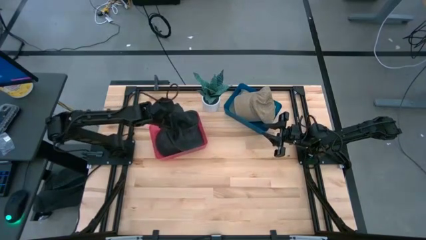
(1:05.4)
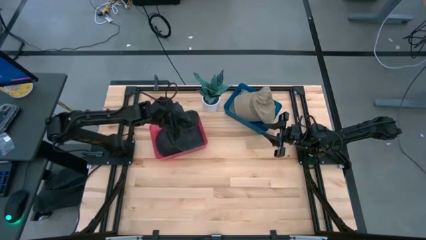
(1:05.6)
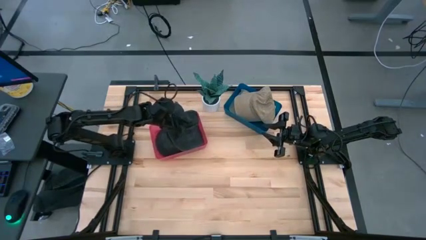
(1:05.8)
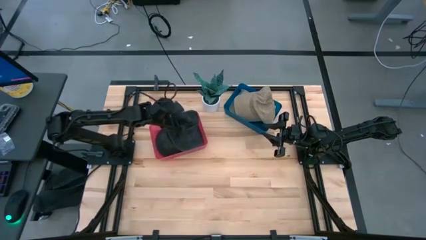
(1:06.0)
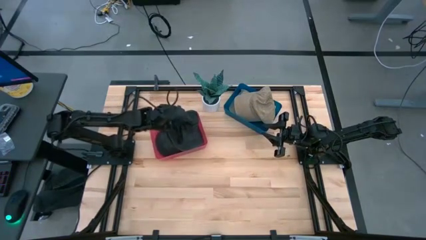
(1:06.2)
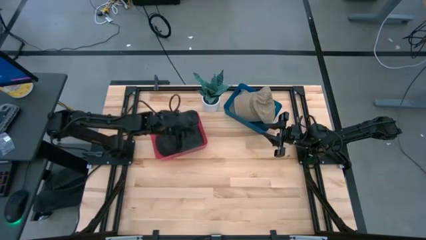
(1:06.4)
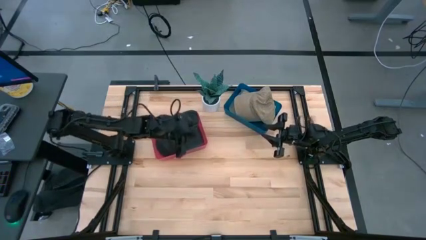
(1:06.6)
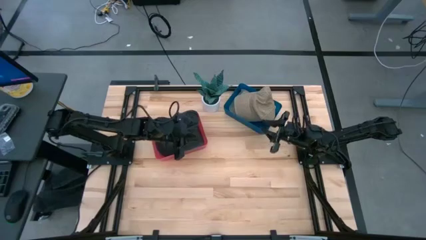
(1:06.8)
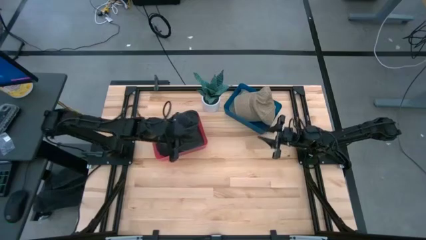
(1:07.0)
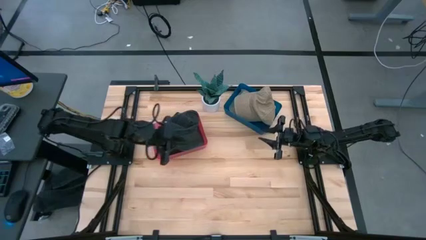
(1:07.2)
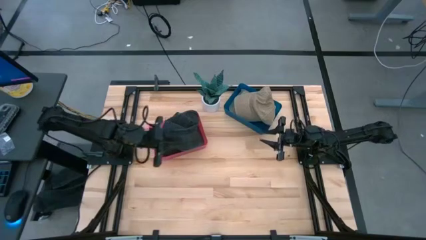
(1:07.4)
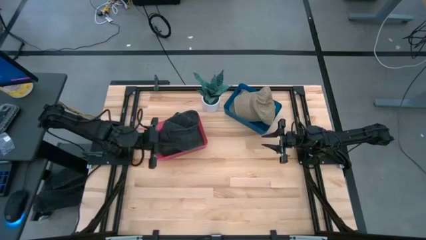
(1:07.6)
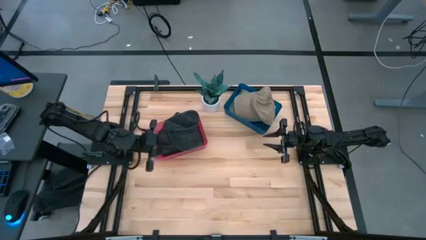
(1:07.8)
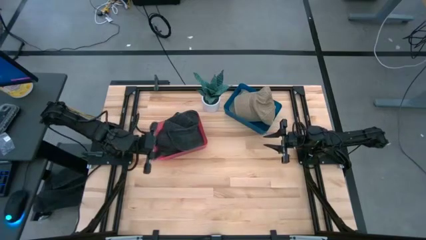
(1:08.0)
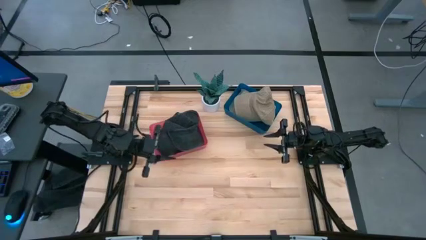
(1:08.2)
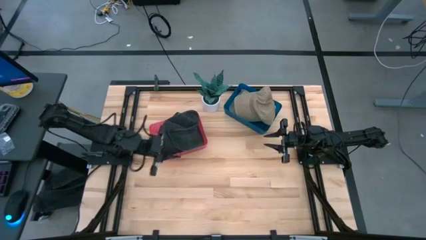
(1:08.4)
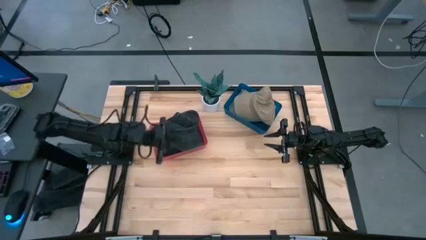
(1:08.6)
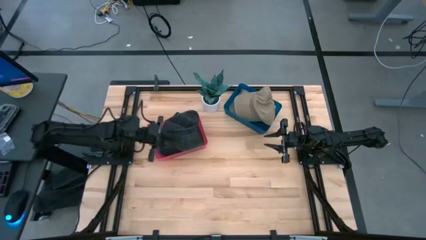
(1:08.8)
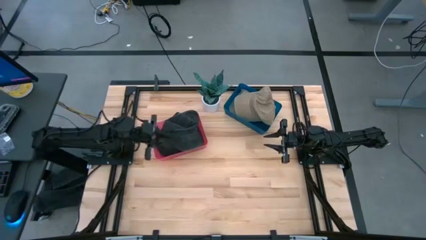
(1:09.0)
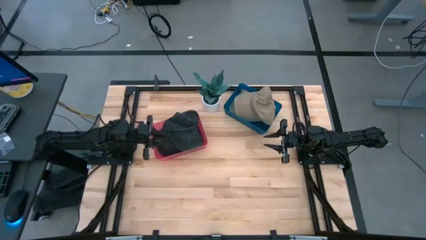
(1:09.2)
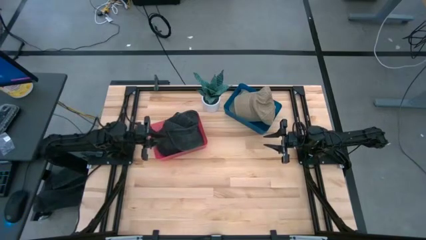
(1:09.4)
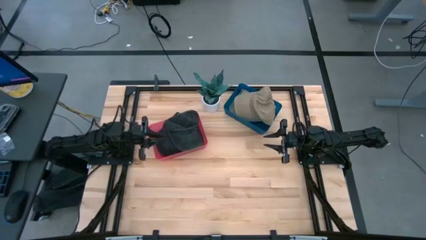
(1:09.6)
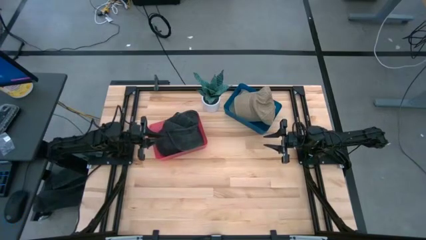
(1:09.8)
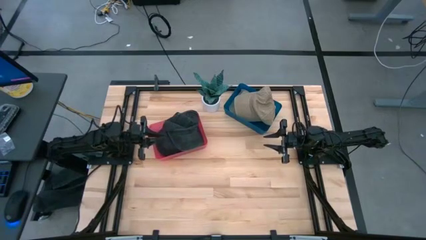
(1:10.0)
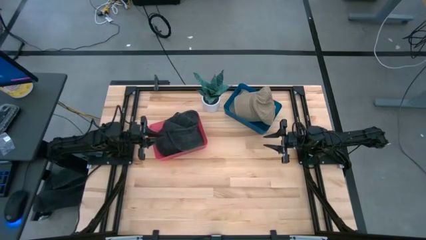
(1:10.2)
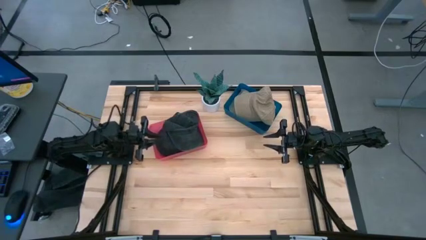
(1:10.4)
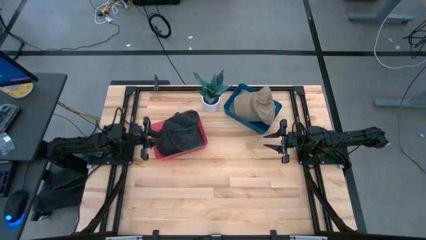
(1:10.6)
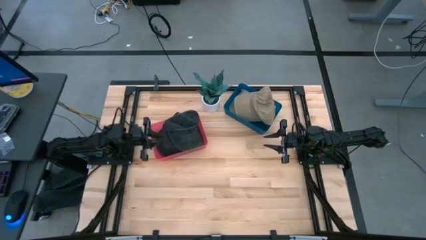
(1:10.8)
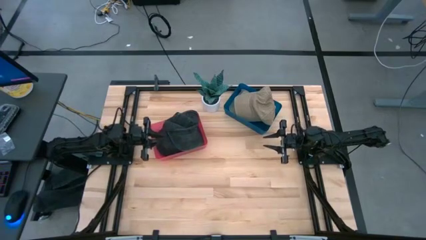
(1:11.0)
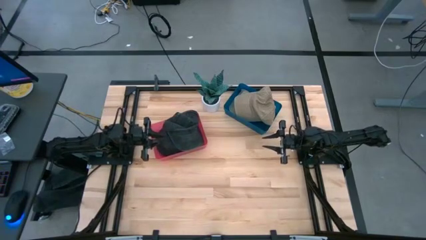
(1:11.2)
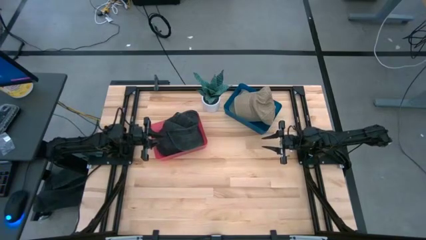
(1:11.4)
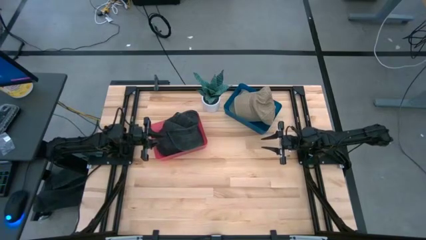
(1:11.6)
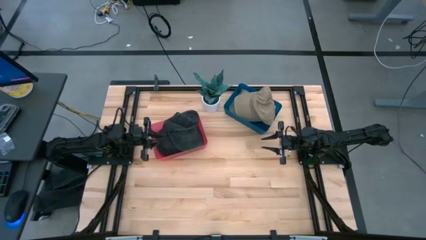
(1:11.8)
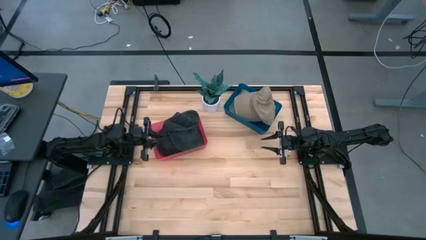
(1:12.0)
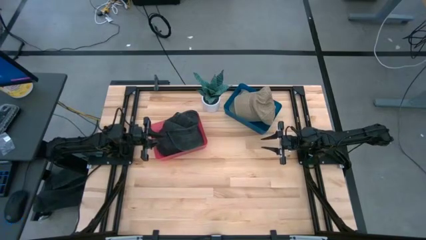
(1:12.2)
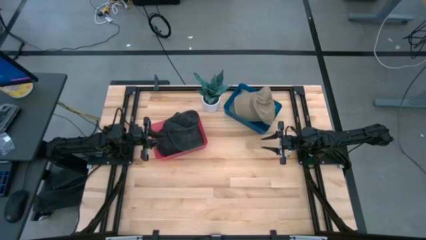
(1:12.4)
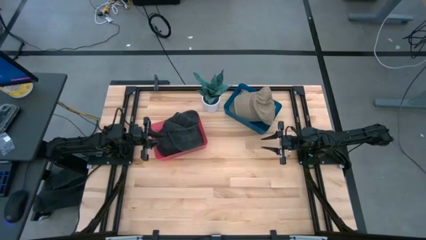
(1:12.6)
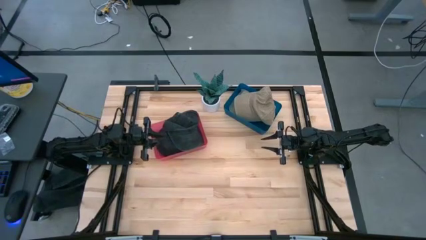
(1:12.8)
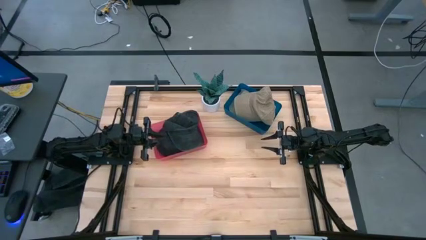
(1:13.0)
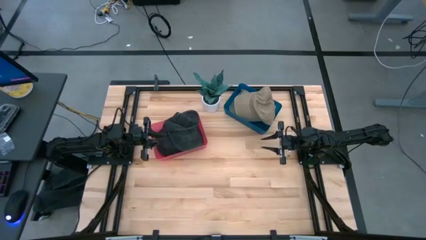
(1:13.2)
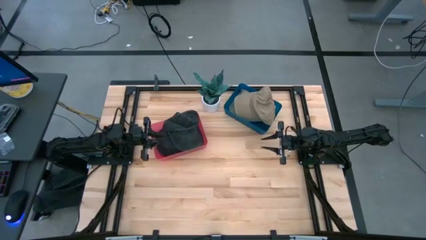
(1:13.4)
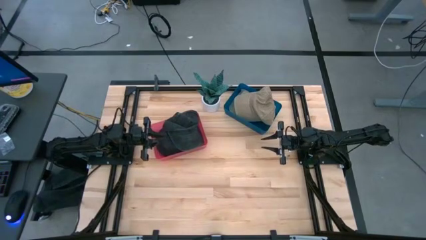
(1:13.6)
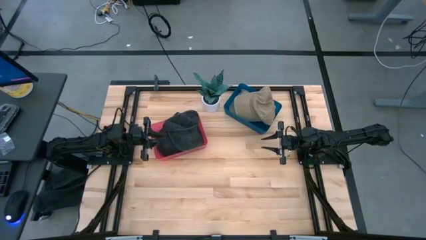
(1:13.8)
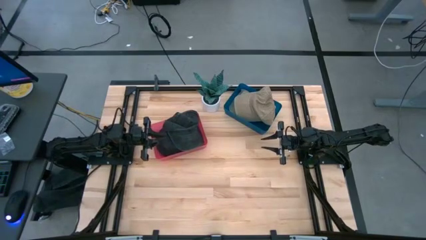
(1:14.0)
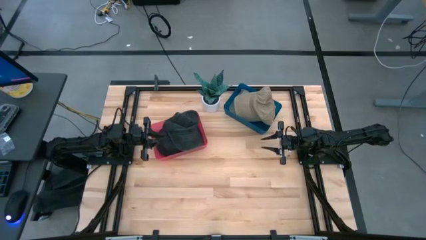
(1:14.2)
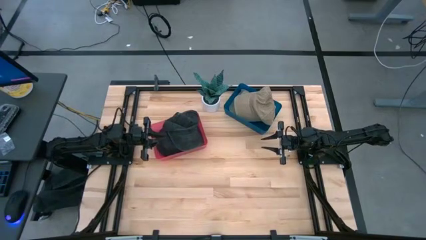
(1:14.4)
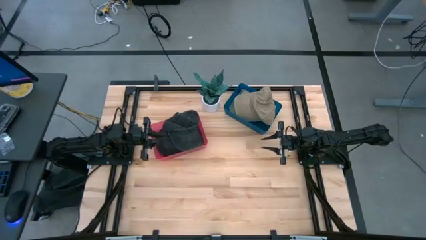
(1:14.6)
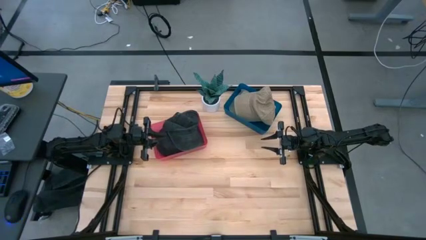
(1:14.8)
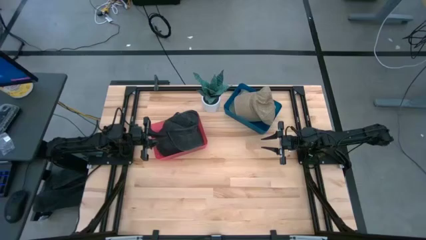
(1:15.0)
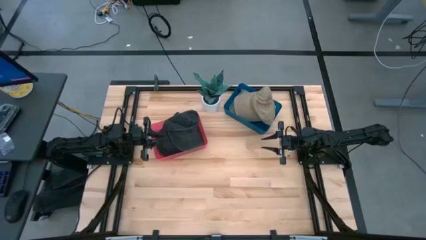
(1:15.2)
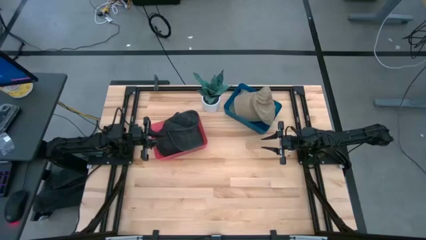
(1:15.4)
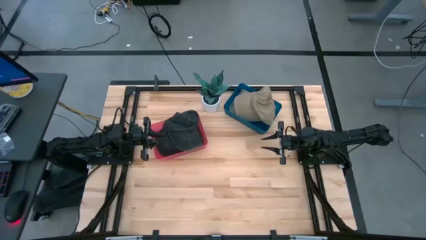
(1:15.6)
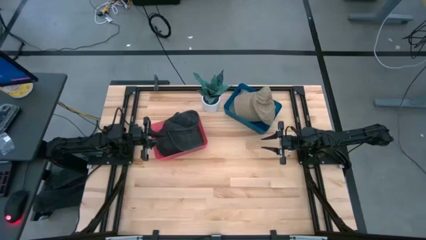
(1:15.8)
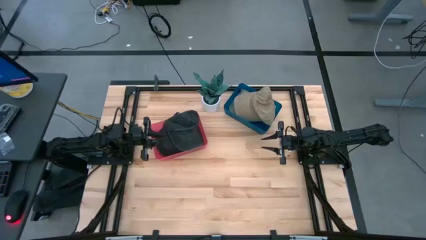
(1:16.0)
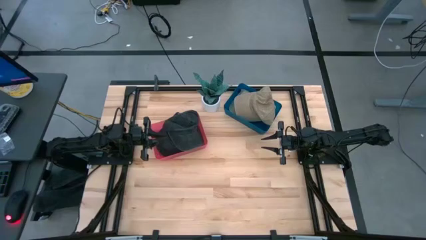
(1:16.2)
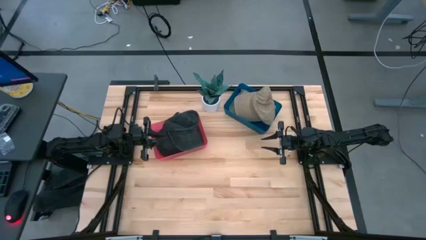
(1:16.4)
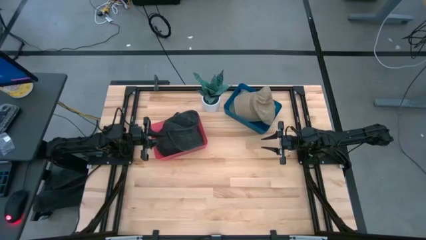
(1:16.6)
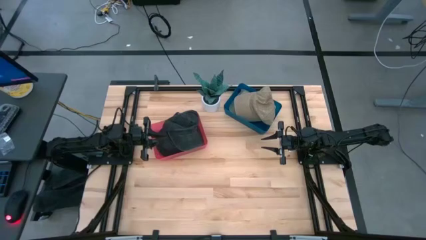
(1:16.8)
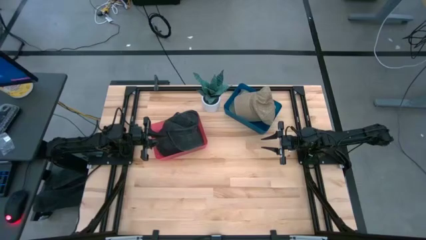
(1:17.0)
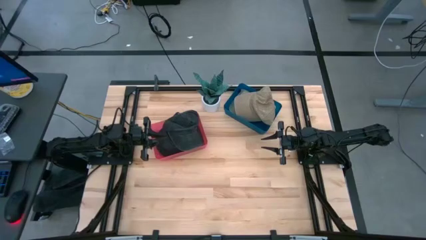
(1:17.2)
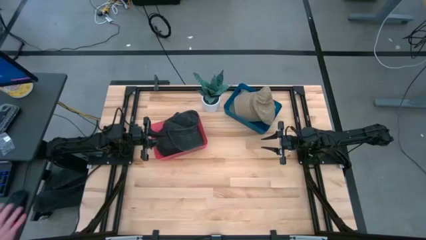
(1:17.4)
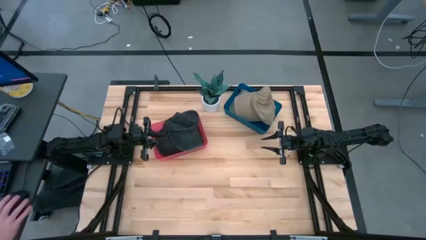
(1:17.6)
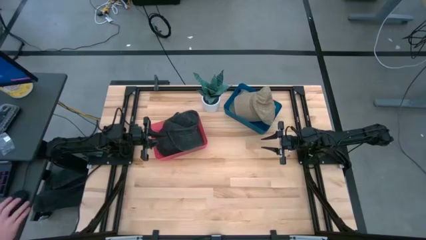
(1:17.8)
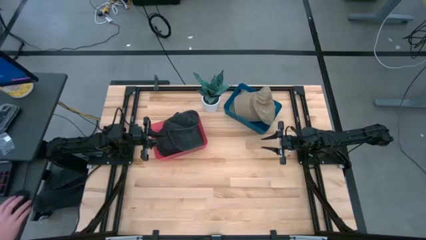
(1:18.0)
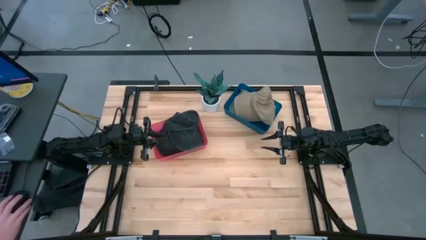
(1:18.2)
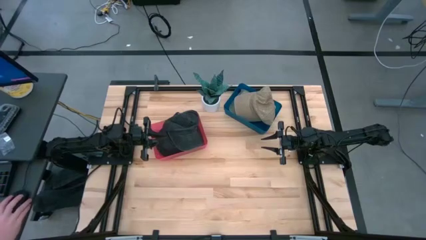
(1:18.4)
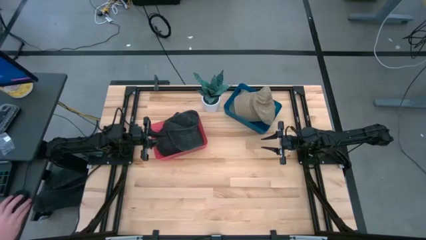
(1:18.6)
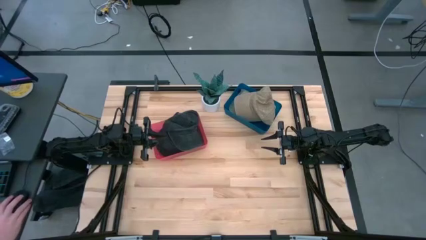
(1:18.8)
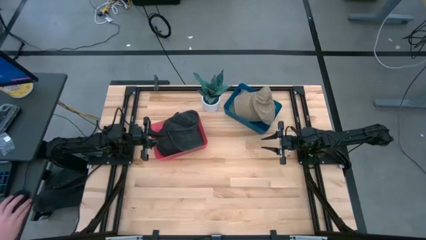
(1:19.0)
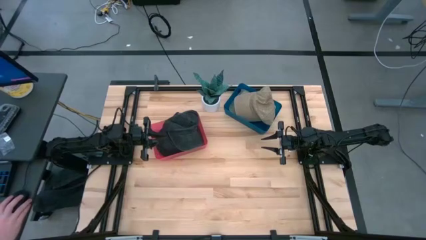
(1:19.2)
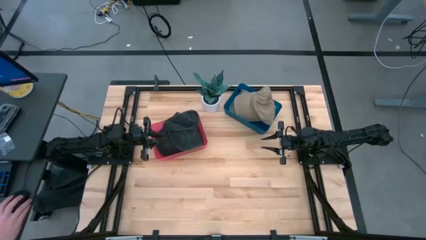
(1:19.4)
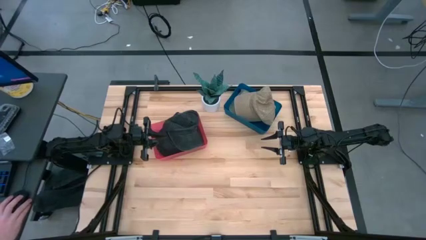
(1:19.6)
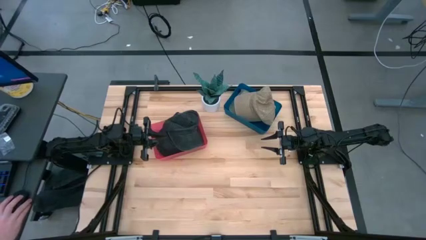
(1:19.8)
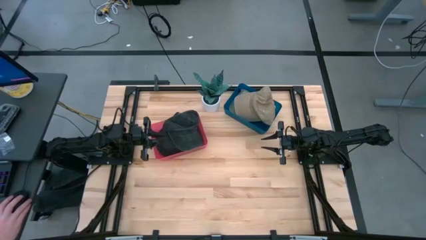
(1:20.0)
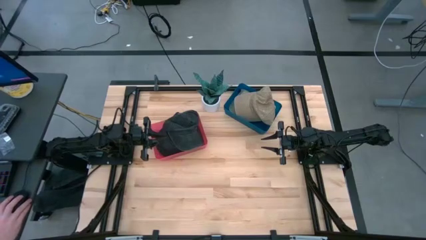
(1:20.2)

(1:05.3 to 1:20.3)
Task: Pick & Place hat
Return to Home Position

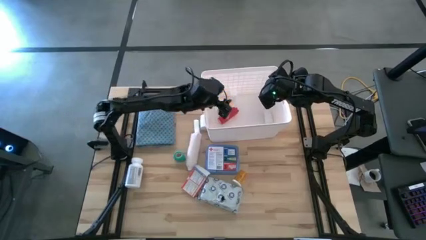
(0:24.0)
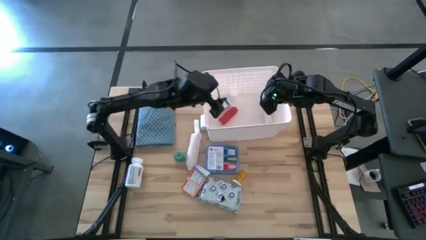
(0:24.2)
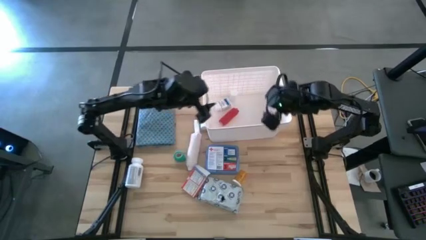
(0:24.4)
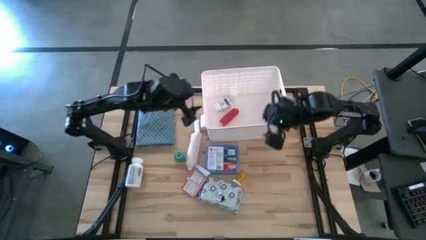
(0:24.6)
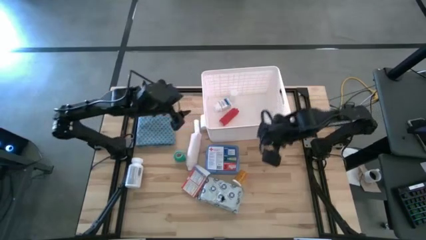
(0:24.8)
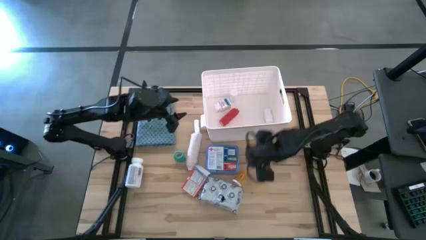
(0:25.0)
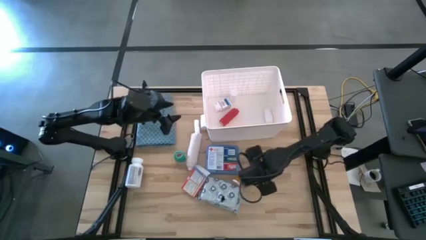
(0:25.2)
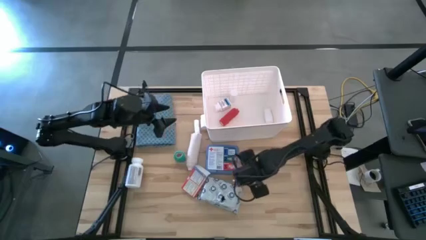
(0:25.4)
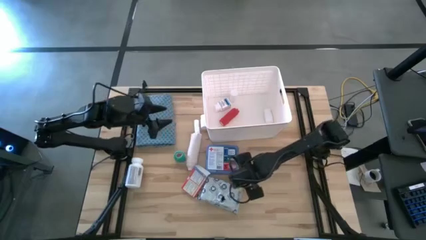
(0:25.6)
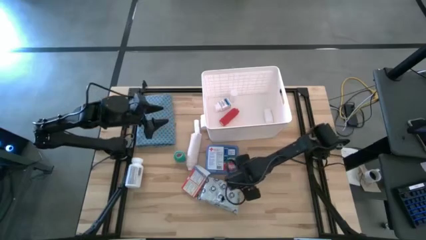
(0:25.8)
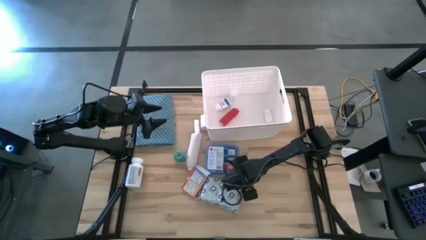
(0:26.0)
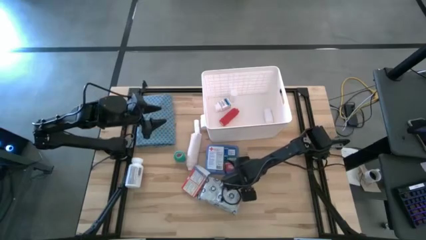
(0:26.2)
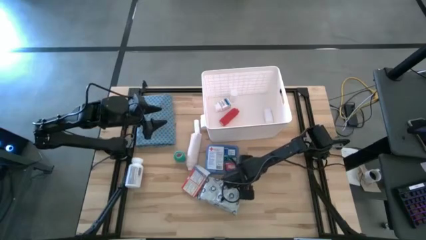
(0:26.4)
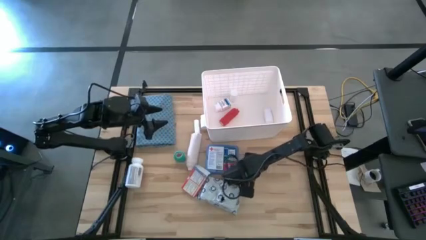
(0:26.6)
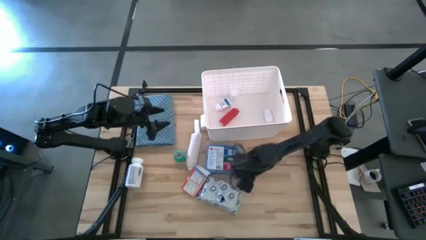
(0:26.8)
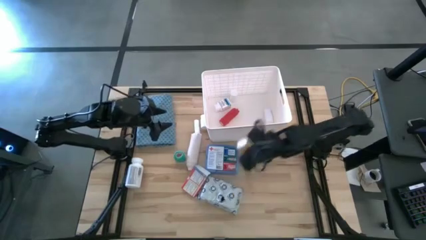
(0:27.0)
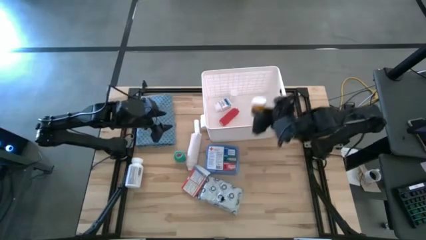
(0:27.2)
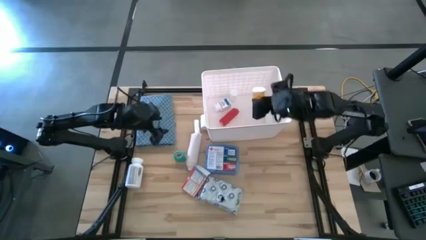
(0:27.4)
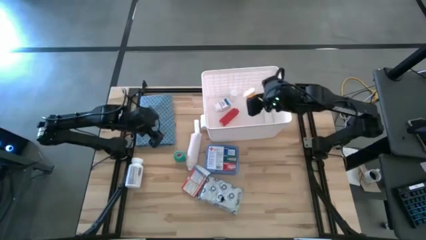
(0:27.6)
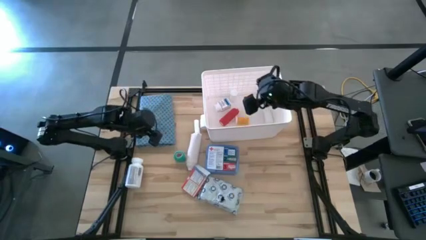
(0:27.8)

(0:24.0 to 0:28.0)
Task: Pick & place medical supplies in basket/bin
Put the orange pill bottle into the white bin
